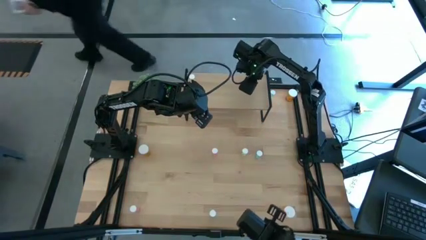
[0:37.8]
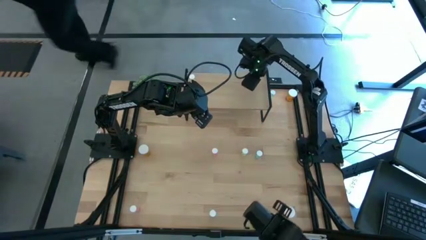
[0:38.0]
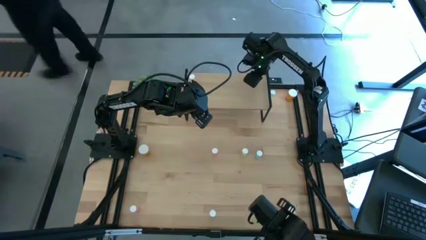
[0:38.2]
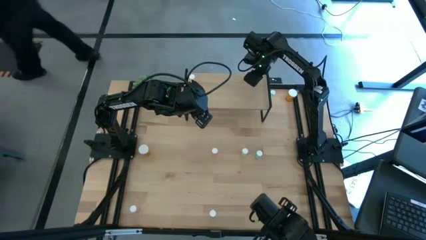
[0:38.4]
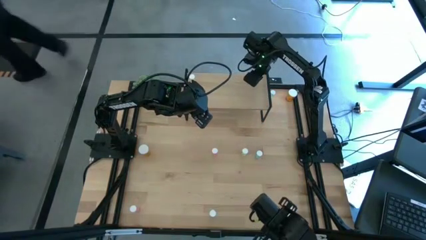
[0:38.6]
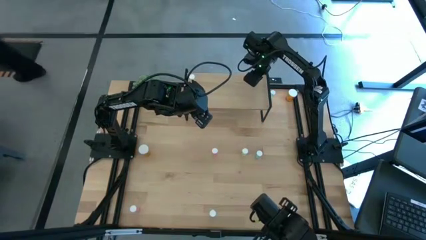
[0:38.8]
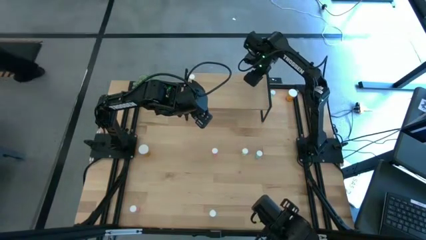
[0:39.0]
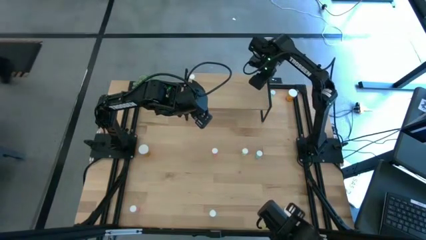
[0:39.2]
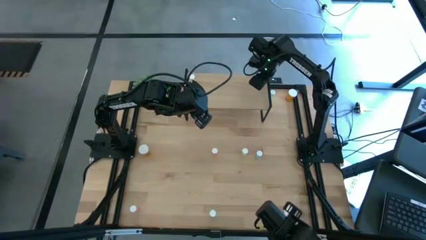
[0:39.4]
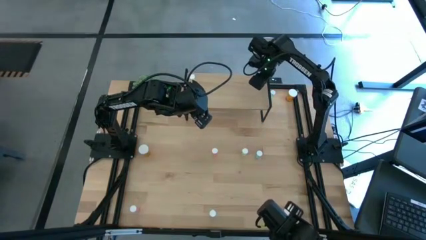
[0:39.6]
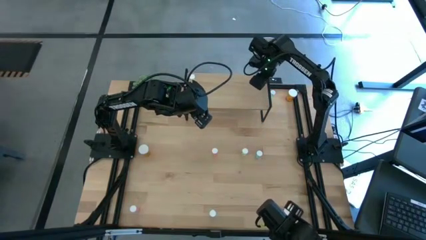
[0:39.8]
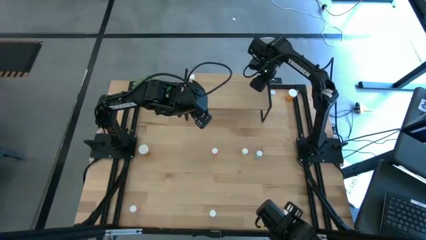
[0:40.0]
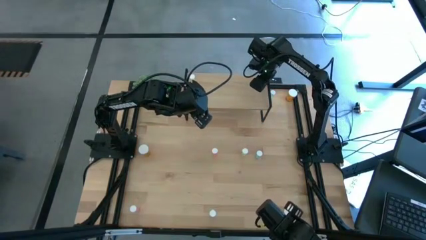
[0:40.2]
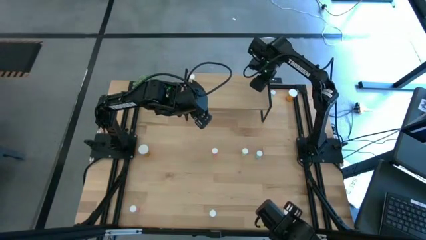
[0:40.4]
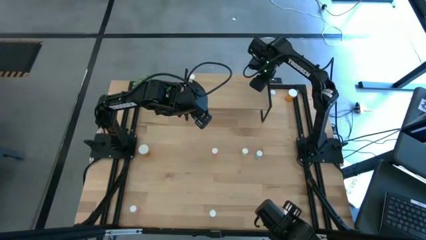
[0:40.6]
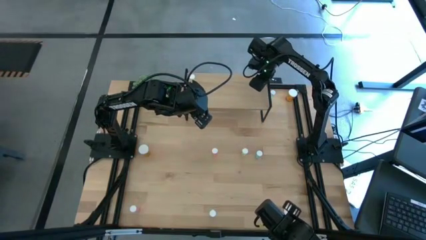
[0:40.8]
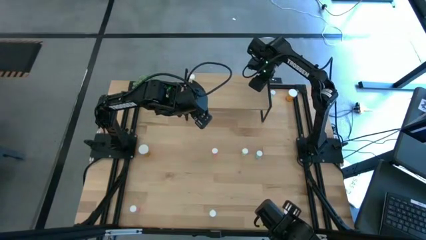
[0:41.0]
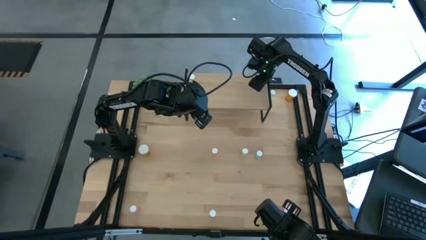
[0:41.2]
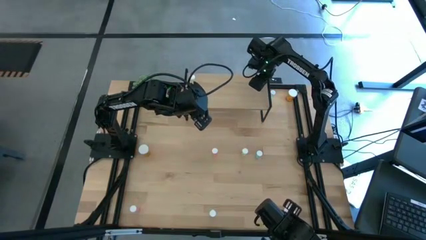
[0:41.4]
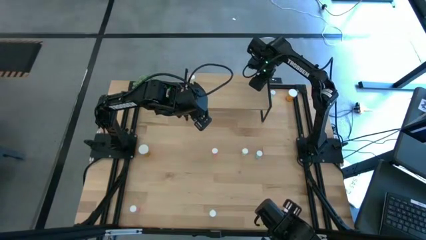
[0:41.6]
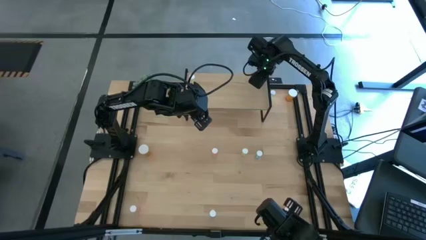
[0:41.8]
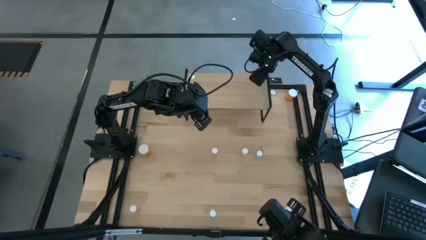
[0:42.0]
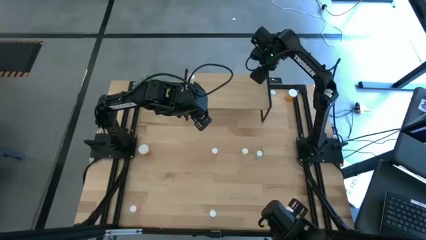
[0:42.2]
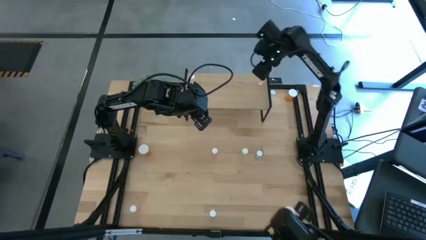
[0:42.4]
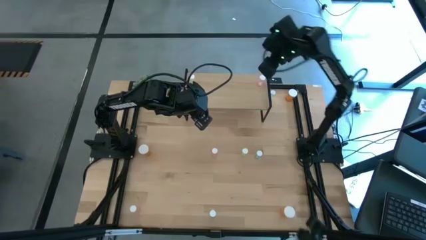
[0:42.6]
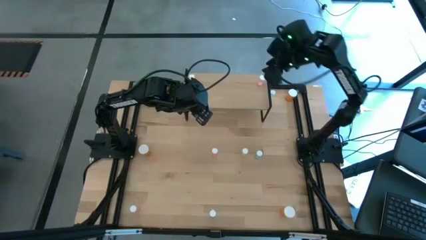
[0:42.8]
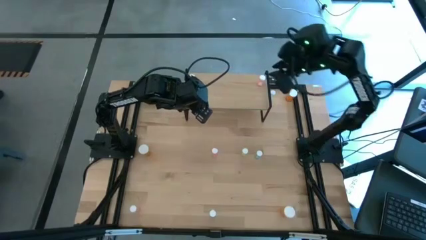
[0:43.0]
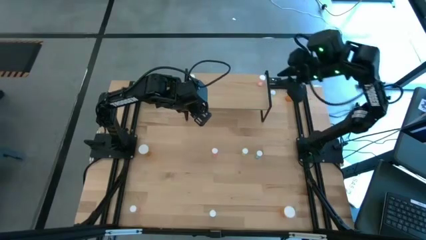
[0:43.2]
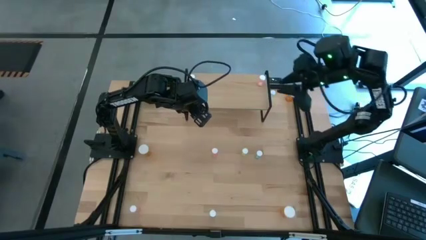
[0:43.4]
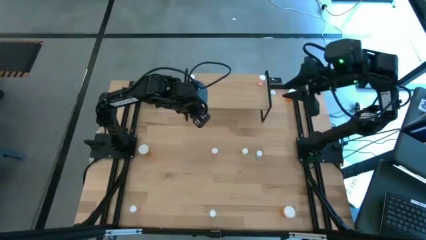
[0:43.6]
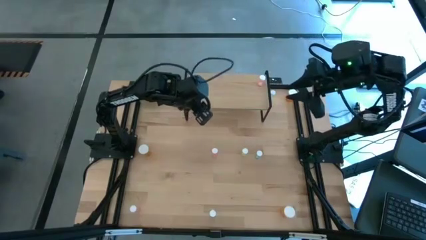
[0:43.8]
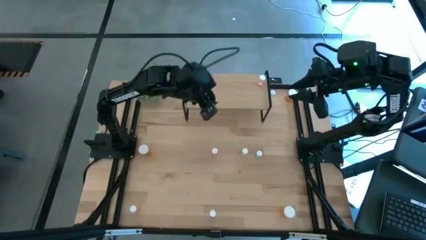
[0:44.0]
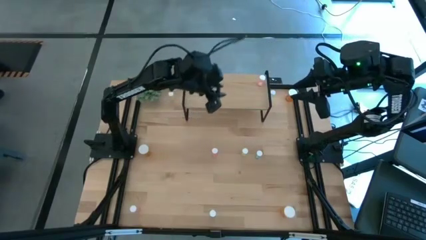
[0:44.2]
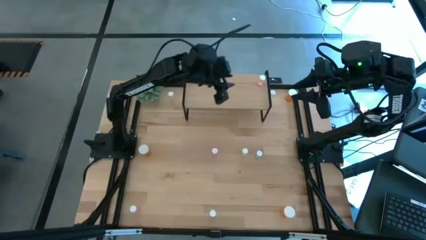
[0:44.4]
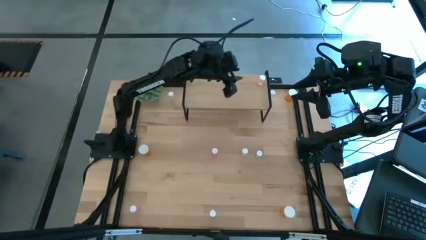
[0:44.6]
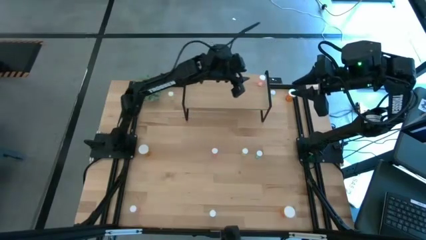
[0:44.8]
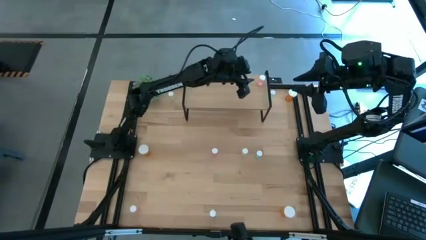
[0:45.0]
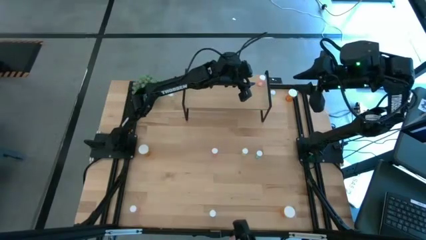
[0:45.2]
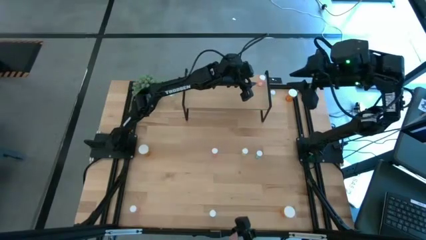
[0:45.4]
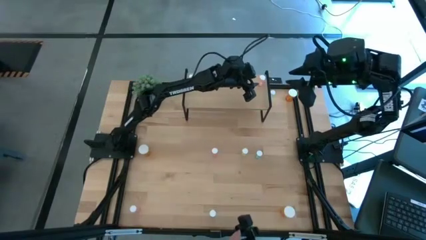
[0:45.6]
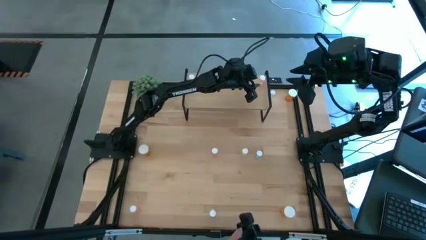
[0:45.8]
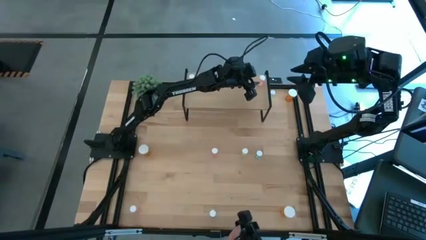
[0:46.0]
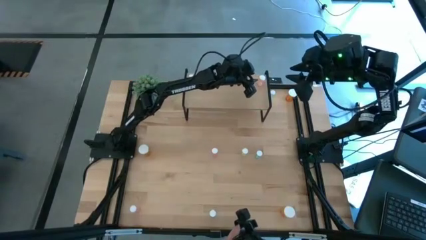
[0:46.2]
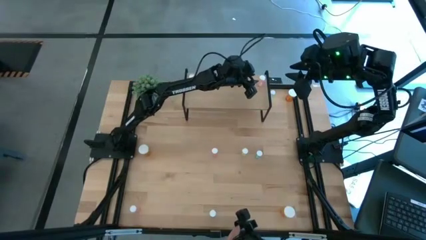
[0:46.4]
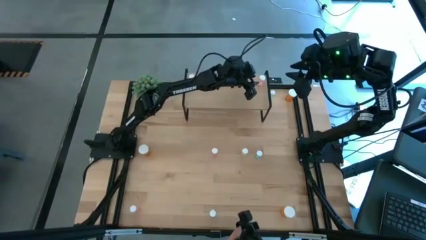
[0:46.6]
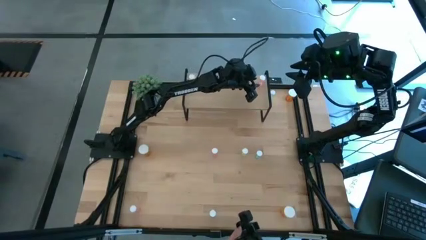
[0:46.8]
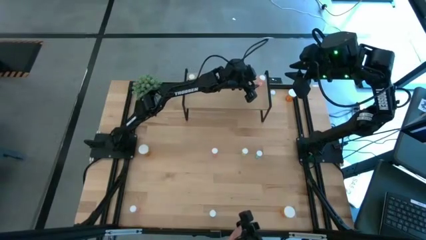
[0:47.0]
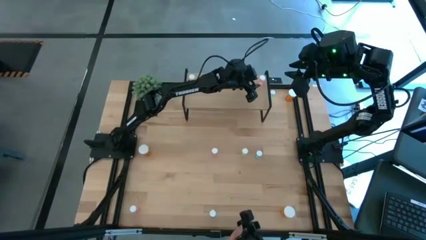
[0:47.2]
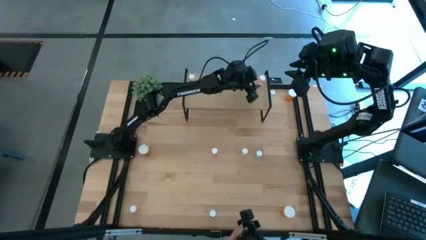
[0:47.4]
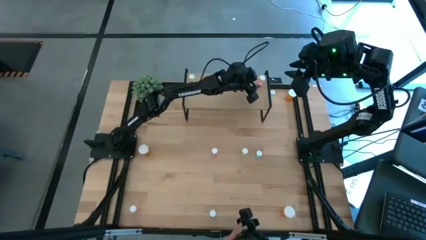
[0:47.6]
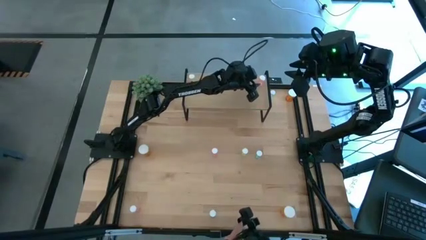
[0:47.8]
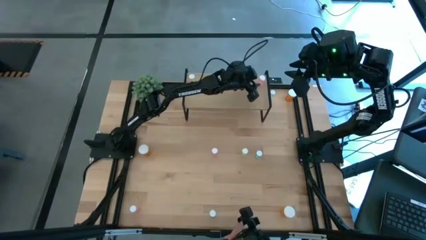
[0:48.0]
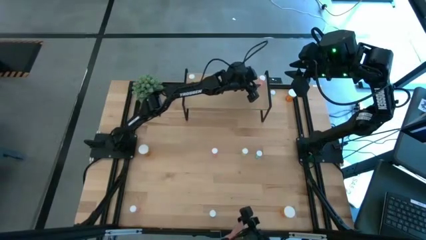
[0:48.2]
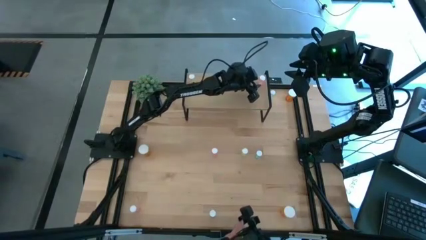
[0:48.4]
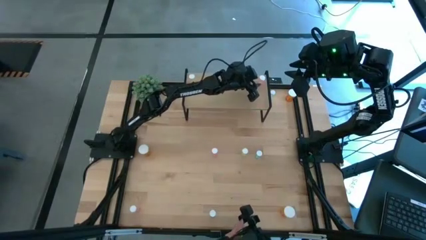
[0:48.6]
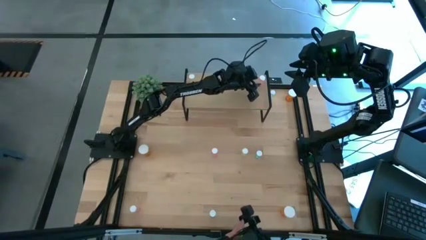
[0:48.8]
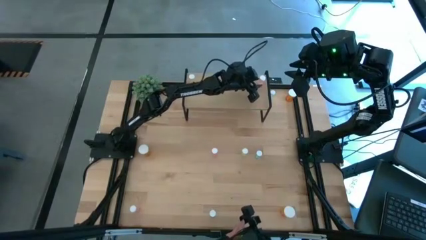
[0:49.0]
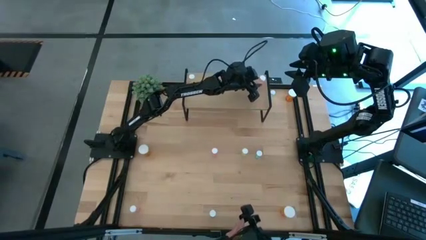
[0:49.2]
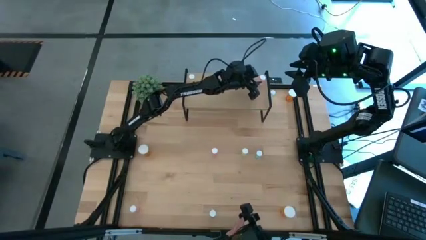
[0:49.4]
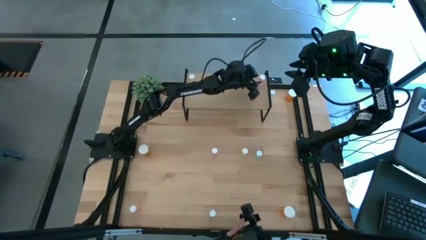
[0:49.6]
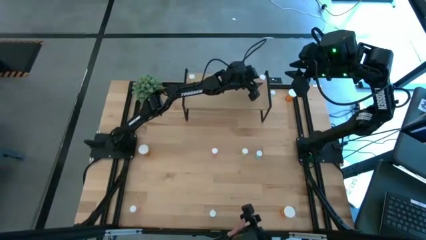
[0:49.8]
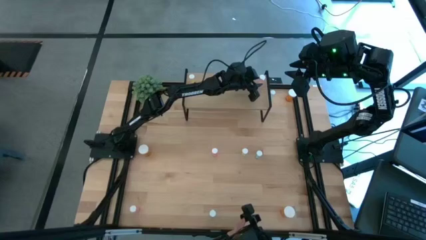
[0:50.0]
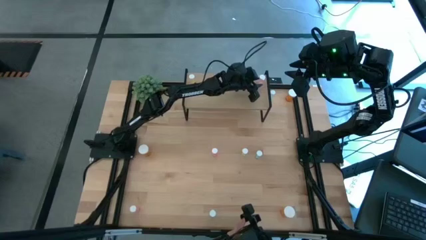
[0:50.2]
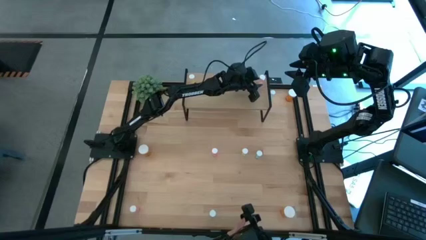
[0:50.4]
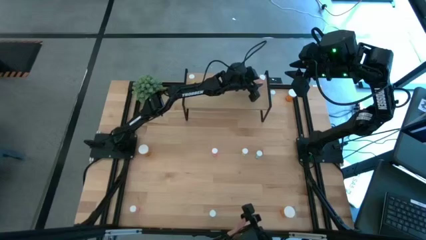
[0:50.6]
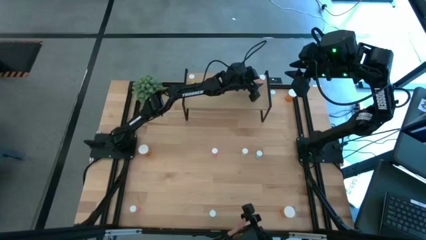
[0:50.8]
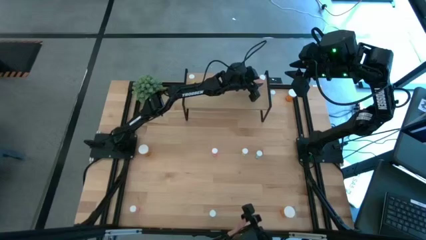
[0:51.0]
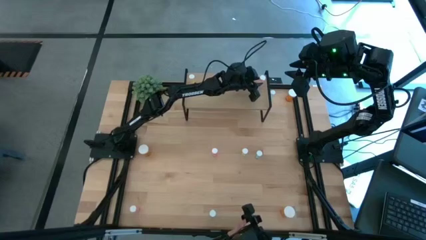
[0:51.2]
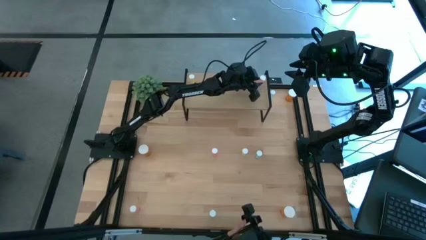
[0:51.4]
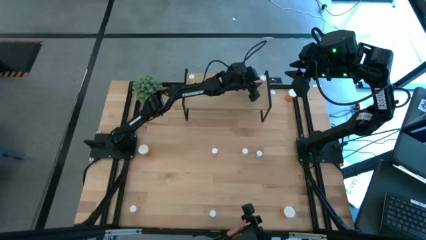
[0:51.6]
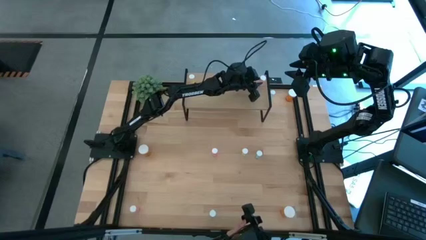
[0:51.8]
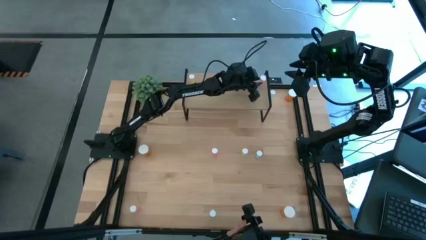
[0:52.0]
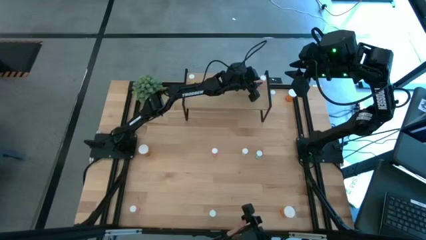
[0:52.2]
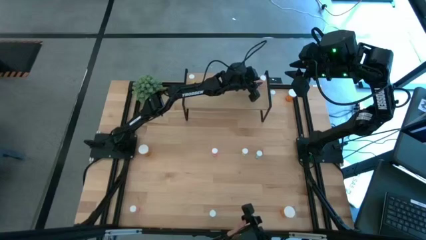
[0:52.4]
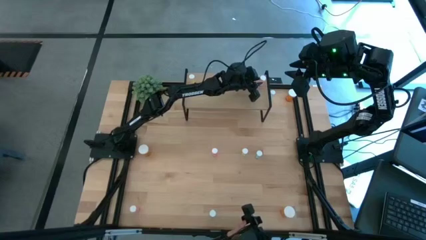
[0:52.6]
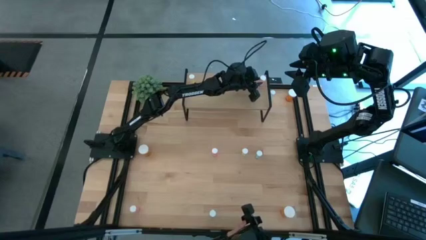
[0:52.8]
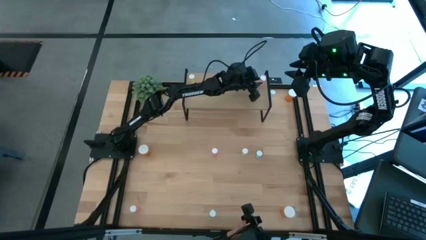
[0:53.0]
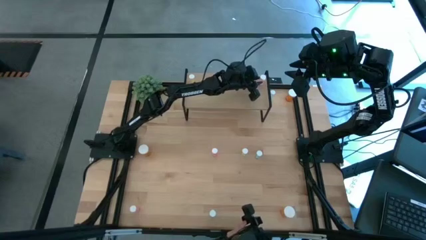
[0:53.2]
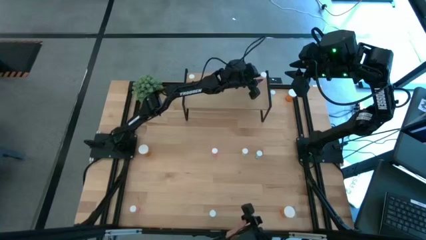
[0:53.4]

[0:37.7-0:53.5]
Task: Pick and place medicine bottles onto shelf by color
Put the top right pink pill bottle on the shelf

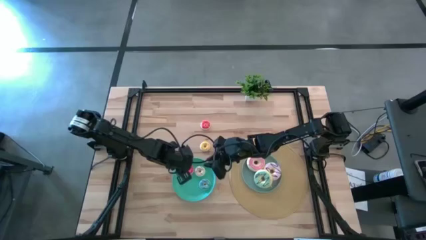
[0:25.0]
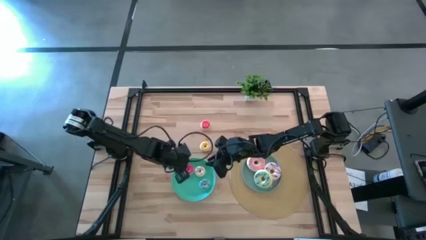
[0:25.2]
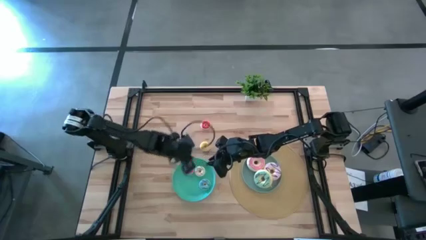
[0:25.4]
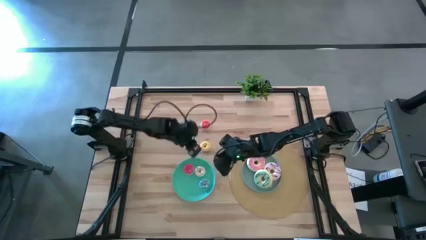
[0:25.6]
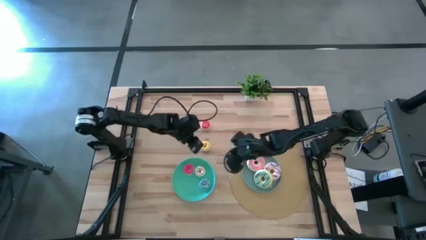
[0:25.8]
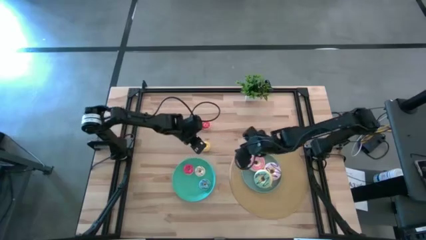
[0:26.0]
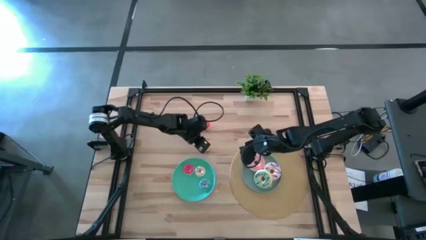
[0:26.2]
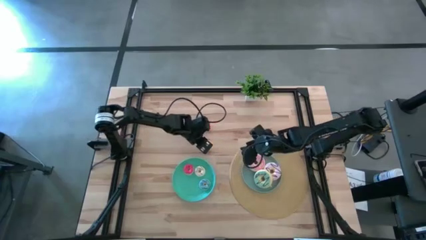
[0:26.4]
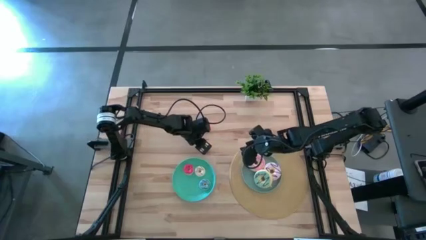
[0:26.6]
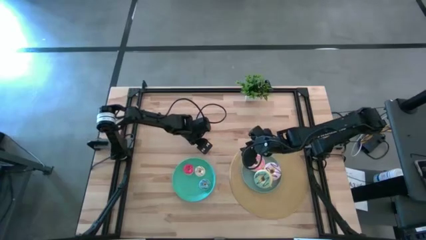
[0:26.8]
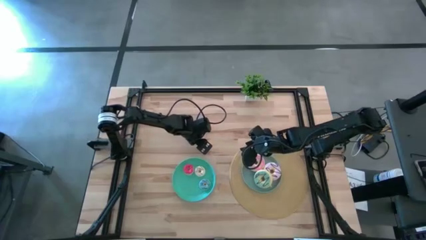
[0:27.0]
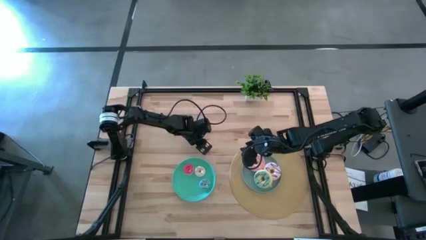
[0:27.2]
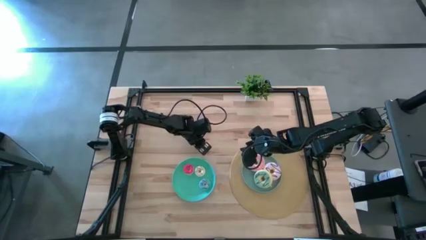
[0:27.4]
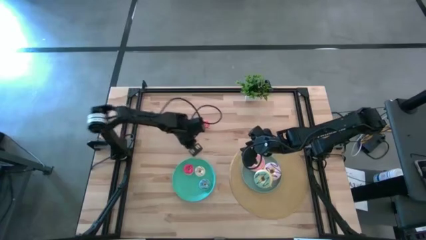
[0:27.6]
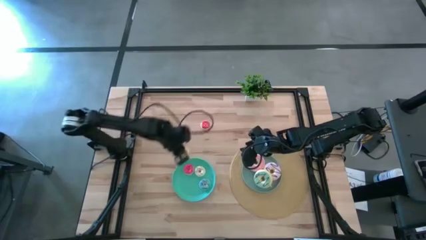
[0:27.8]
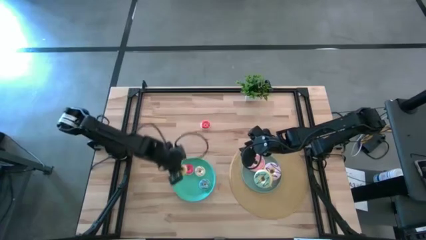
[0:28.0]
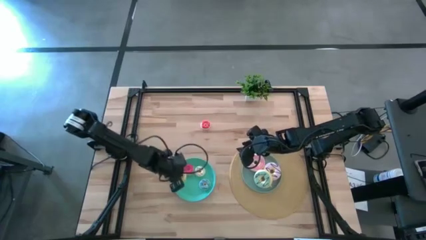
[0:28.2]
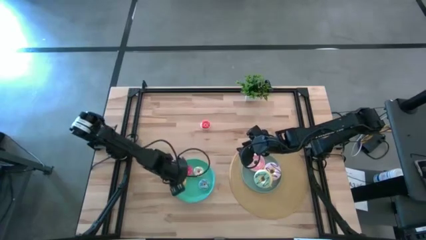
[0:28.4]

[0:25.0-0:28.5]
Task: Pick & Place donuts
Put the small yellow donut on the green plate
